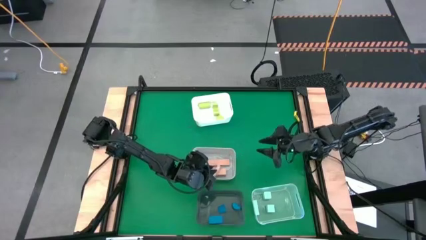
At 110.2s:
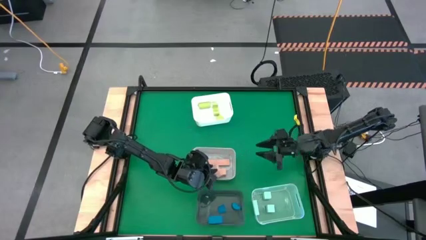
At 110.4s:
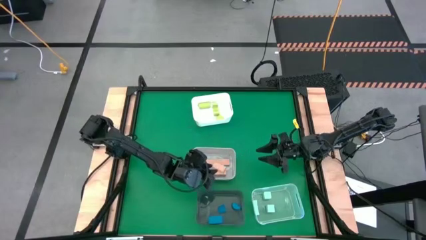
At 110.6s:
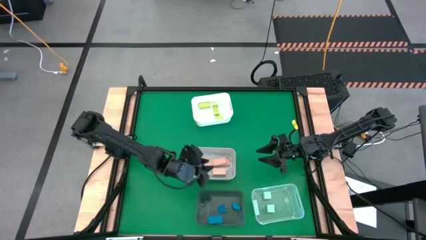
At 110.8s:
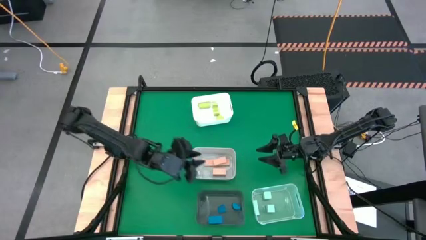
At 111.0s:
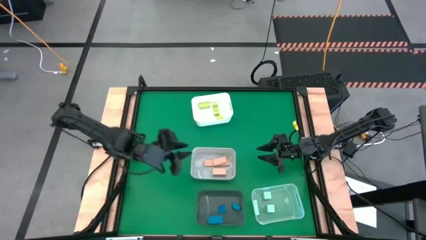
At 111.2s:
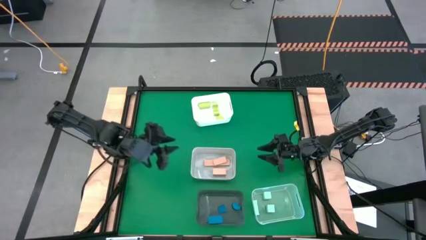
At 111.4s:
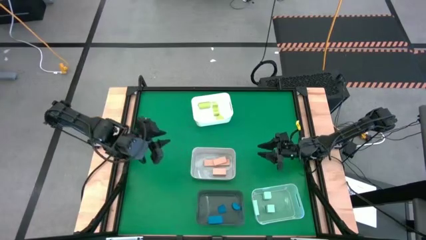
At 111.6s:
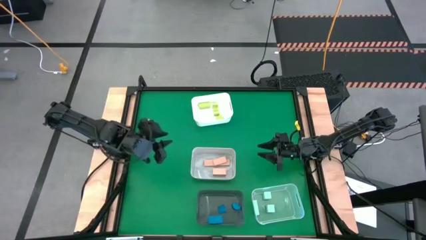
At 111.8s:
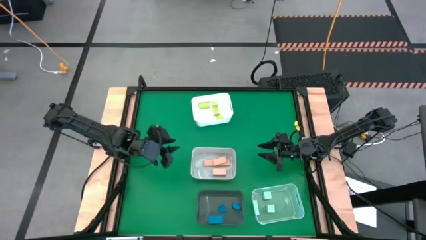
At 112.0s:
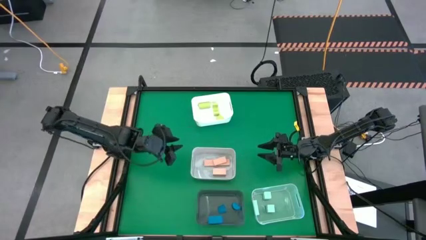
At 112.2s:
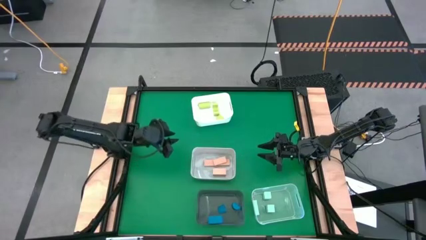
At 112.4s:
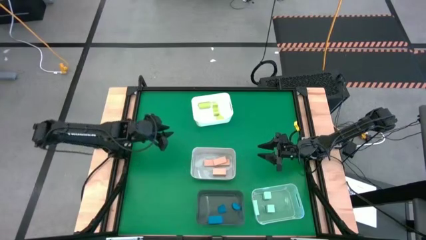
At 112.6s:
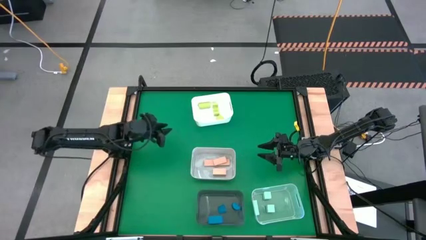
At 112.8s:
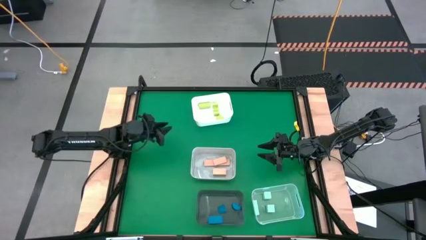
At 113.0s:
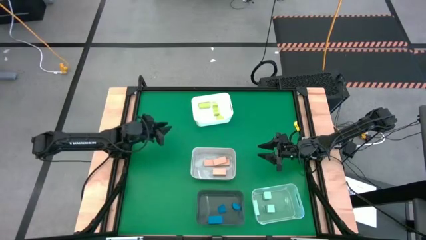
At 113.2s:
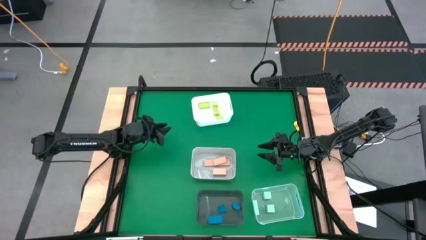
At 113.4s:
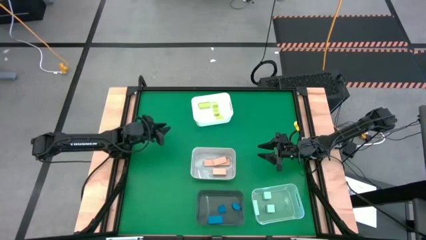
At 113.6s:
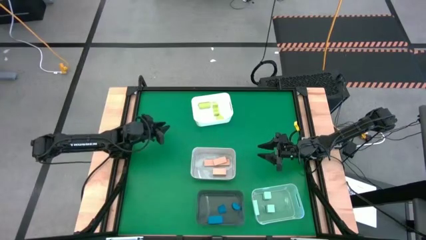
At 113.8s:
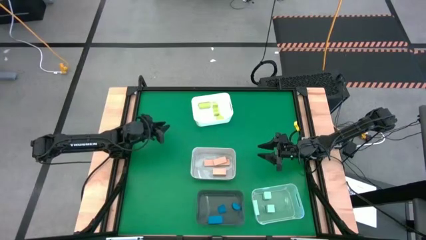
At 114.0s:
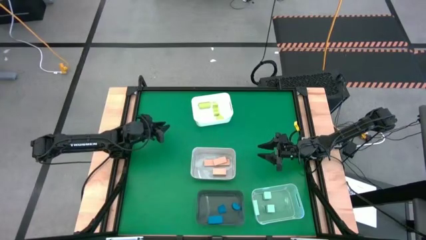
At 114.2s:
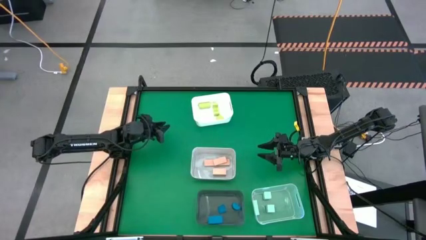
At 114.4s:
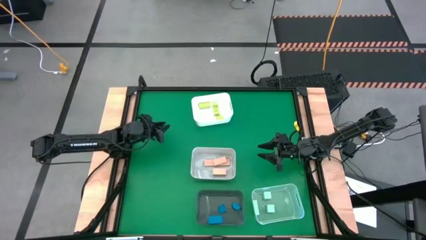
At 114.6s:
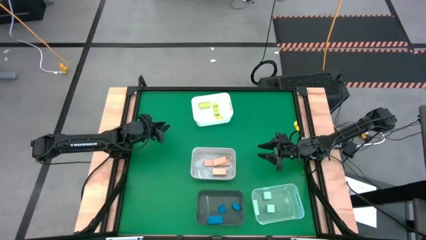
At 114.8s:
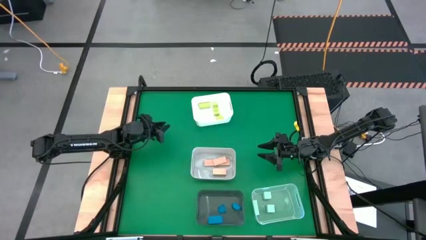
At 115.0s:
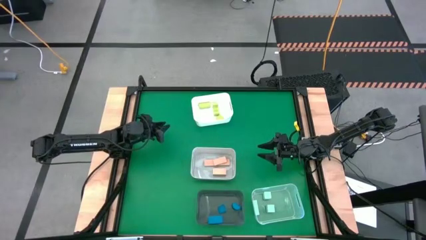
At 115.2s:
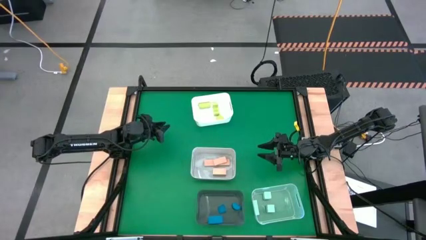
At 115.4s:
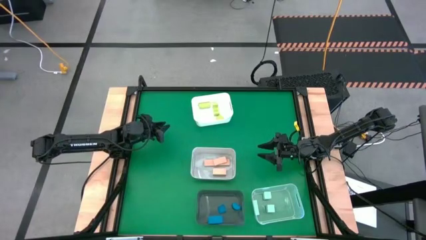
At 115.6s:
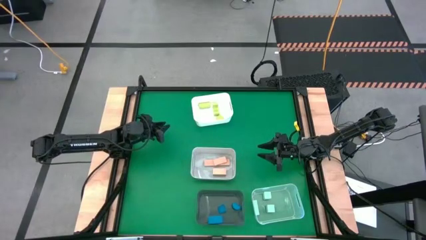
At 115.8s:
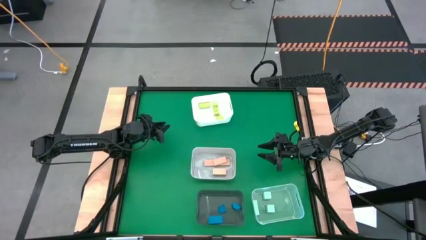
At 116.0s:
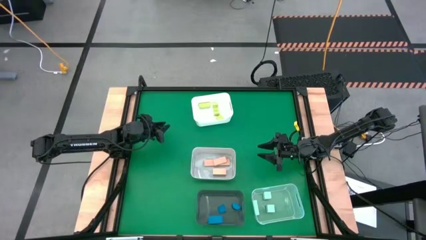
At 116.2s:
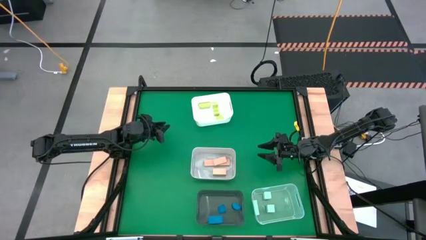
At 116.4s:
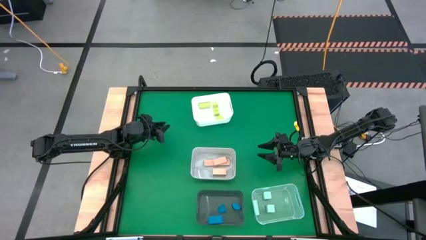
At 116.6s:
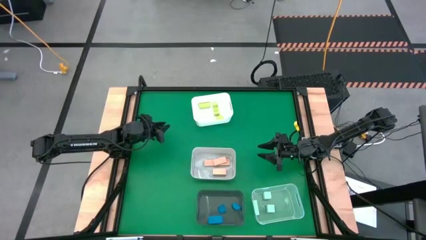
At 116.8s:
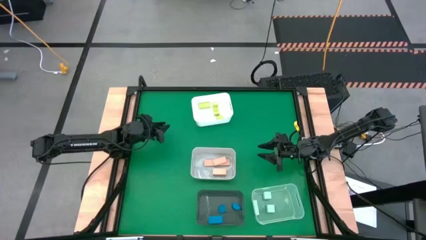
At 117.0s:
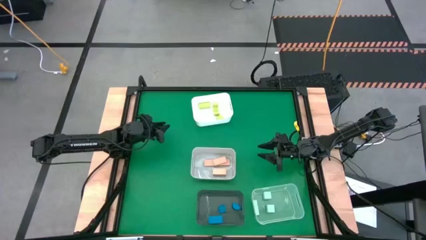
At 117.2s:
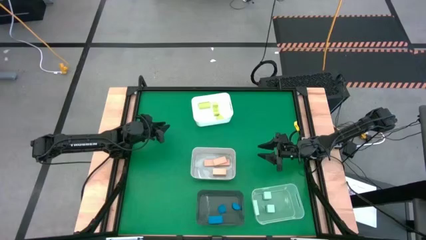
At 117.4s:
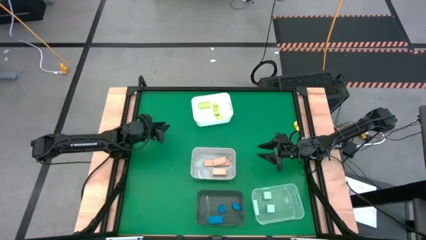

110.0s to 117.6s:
Task: Sort & place blocks by color
Return to Home Position

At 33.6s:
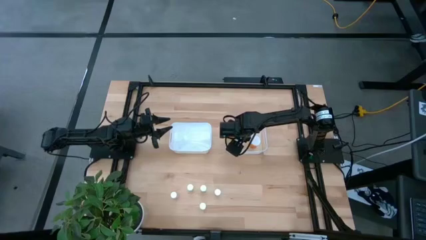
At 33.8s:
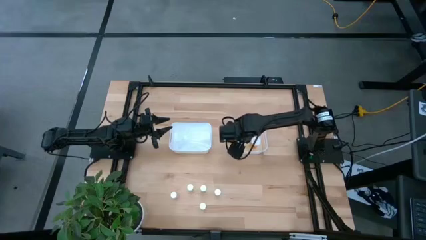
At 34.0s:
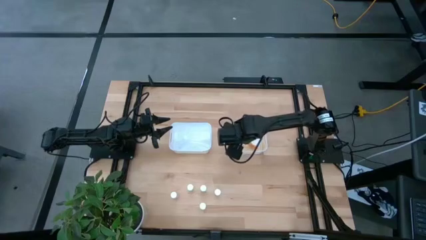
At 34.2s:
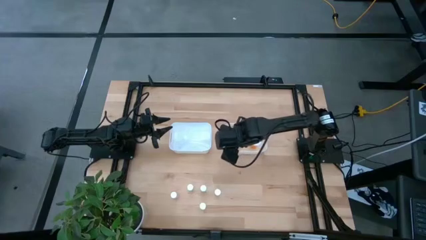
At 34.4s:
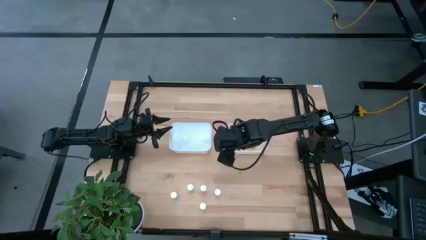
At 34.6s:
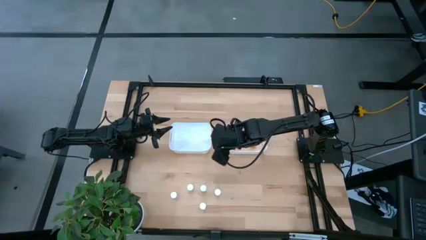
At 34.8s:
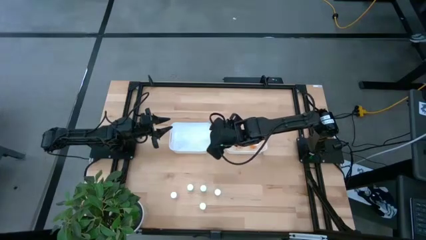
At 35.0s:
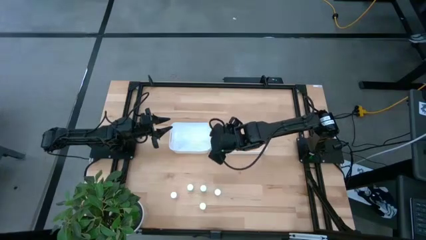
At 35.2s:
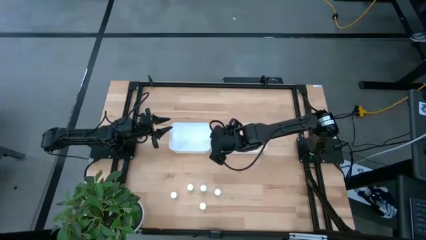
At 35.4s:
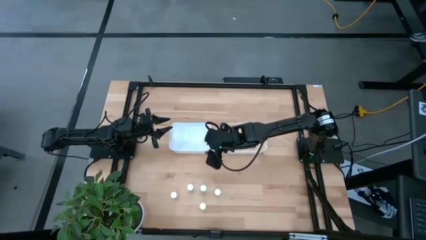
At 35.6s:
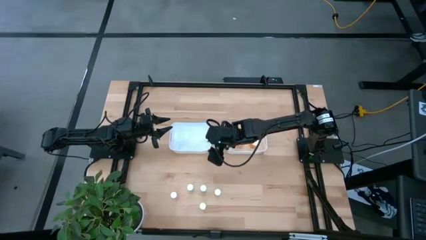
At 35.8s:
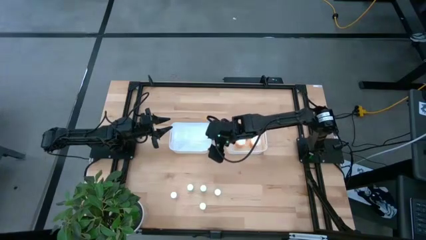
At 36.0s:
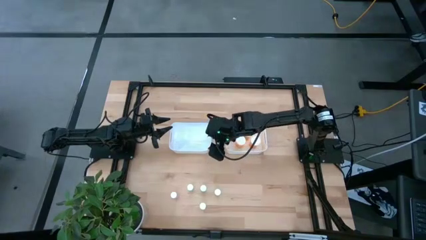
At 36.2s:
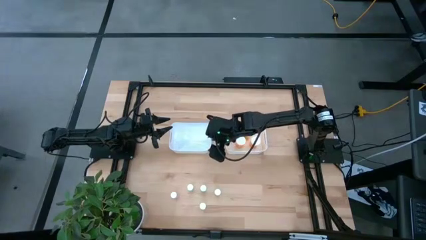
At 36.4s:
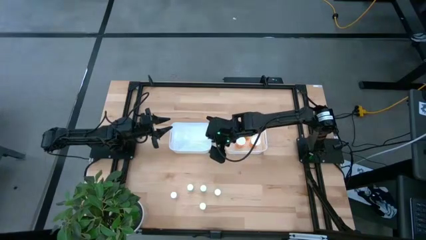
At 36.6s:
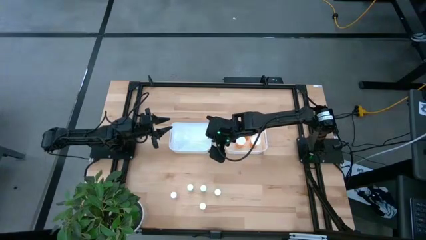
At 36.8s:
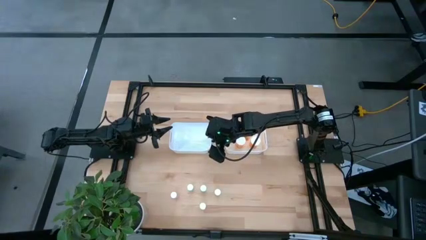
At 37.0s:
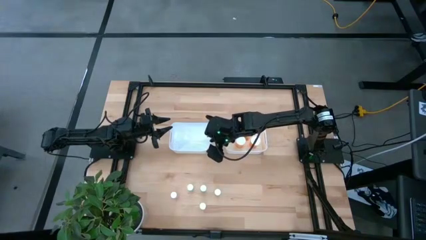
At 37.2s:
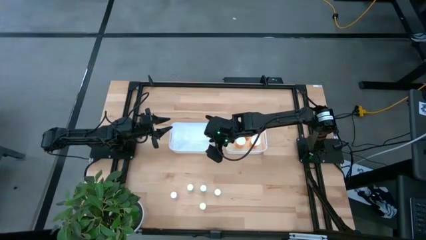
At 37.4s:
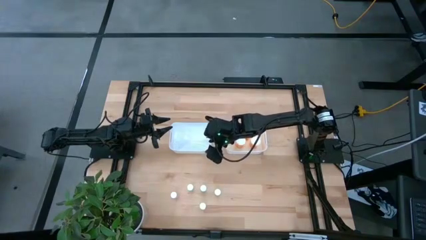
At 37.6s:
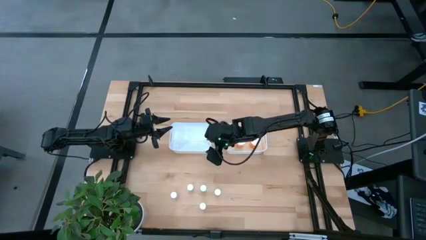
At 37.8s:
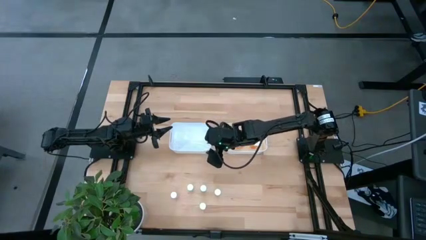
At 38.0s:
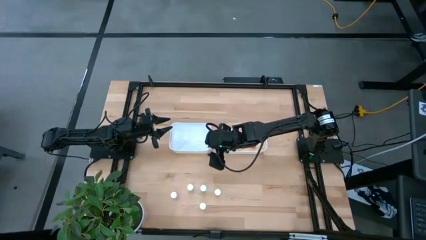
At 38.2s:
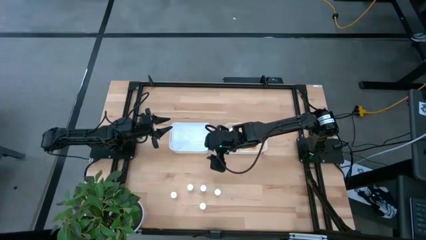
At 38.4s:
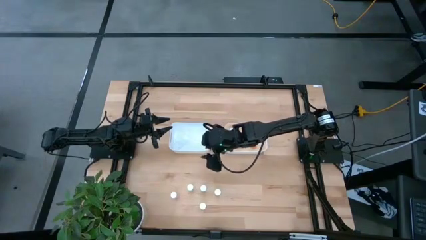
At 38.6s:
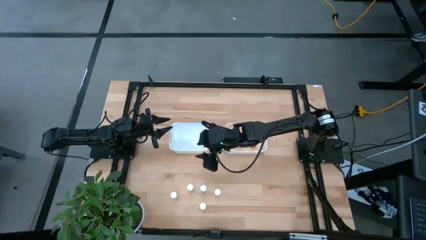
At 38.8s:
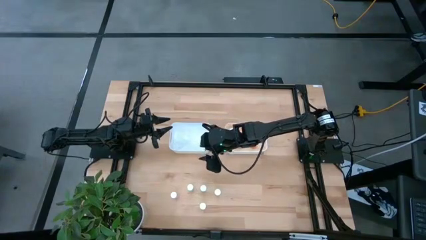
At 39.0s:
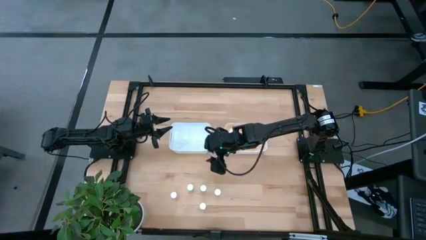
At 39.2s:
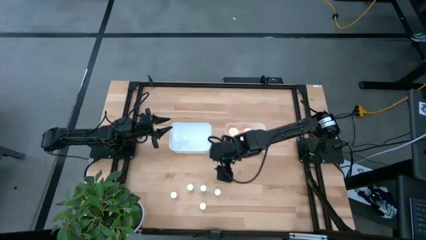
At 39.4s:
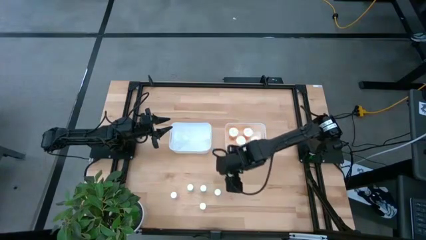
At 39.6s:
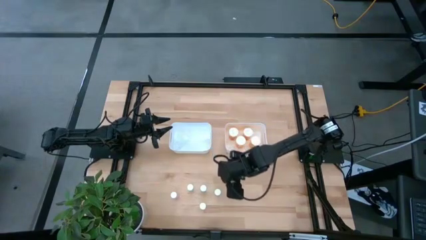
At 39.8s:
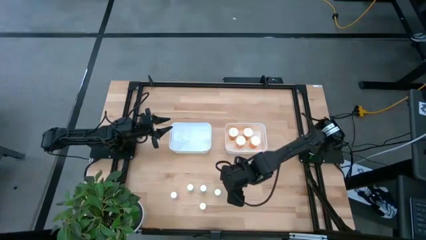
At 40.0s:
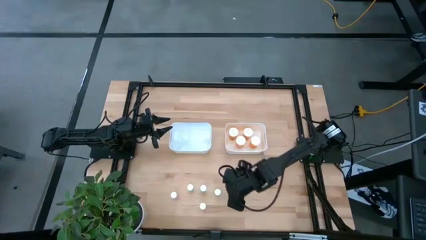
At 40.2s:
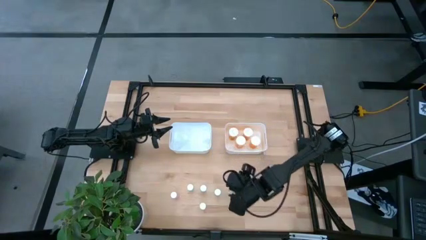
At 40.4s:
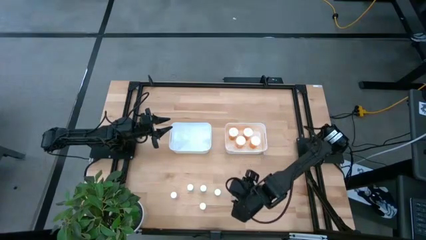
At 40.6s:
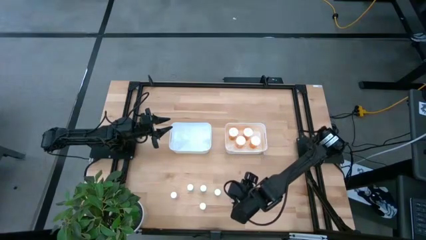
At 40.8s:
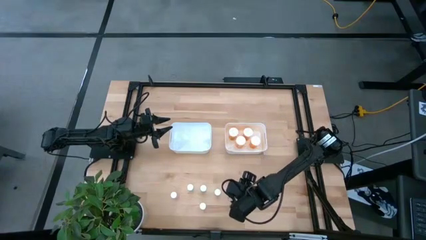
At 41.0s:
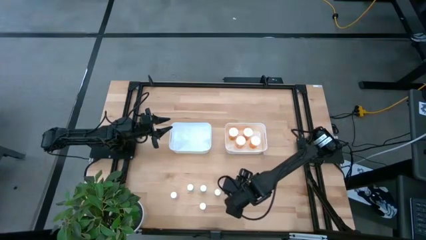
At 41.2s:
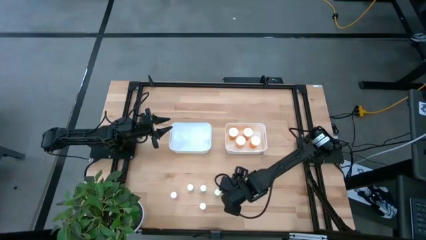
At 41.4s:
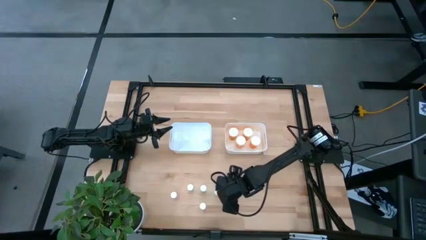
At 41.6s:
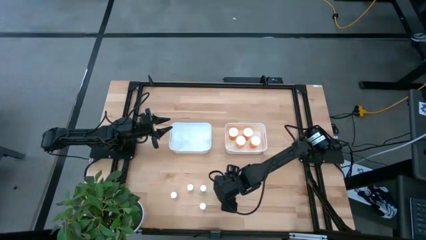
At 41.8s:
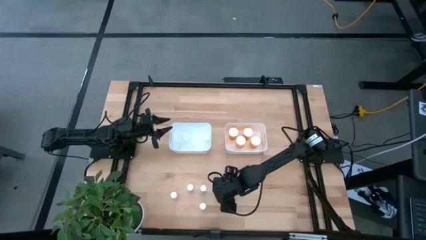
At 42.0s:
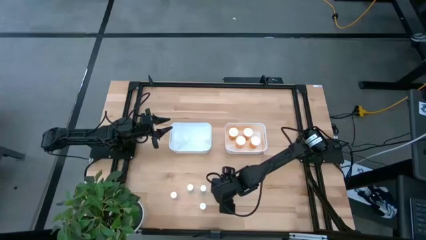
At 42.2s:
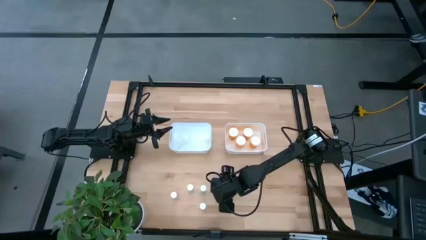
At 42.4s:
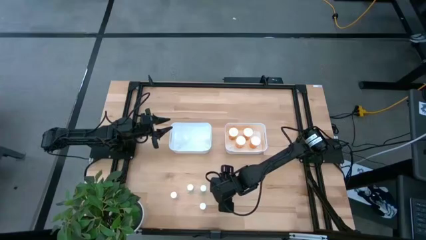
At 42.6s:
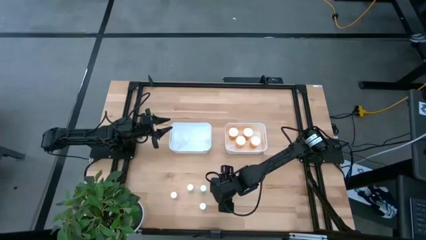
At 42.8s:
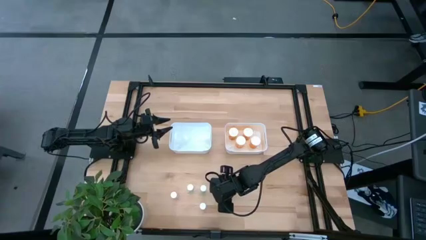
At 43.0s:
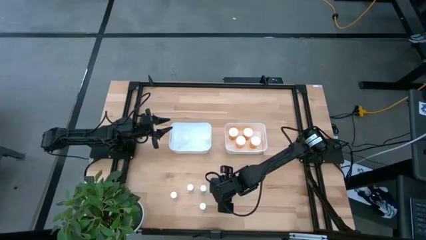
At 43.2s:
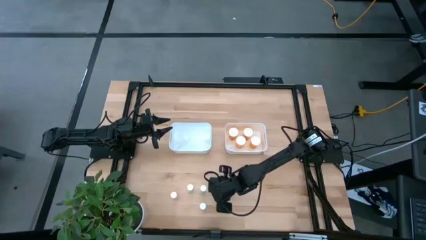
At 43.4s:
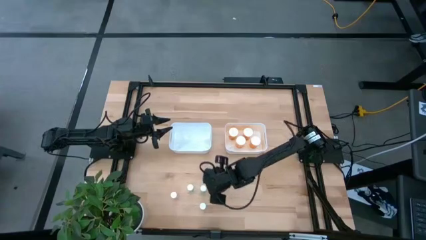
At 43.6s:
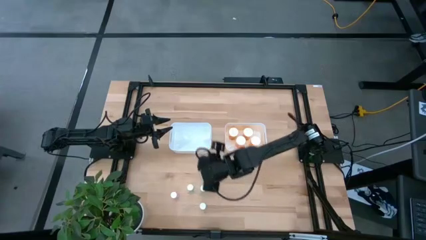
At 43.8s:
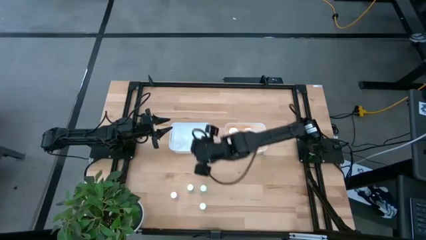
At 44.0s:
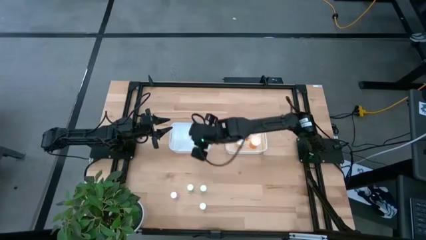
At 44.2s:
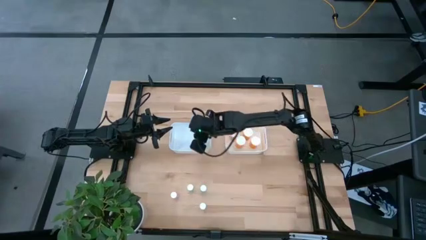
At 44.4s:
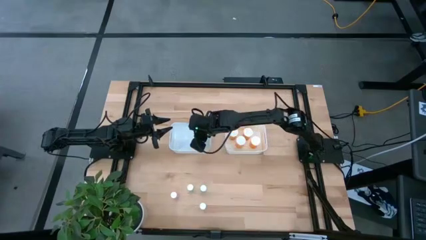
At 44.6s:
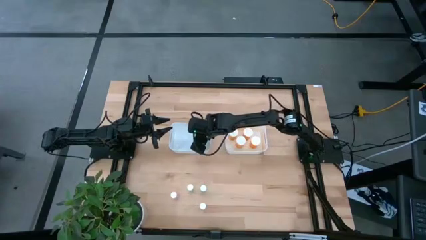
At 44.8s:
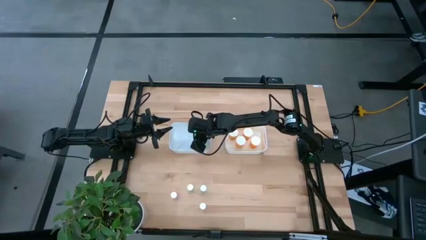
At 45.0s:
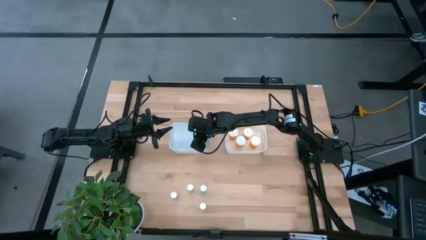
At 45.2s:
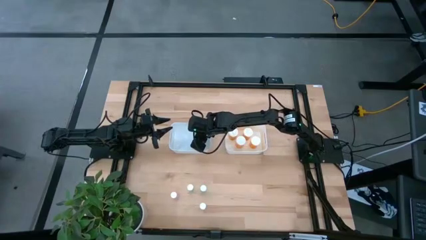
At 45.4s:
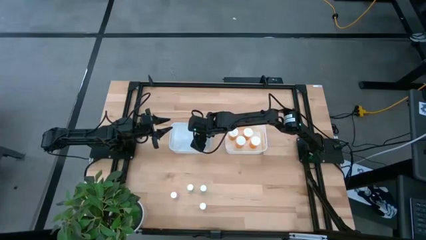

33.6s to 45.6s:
Task: Pick and place medicine bottles into bin by pill shape (circle, oval)
Put the small yellow pill bottle into the left white bin
